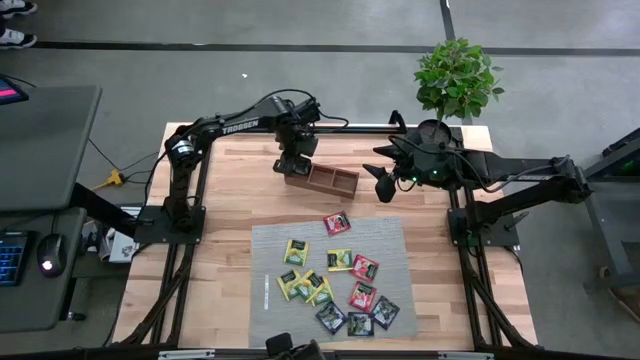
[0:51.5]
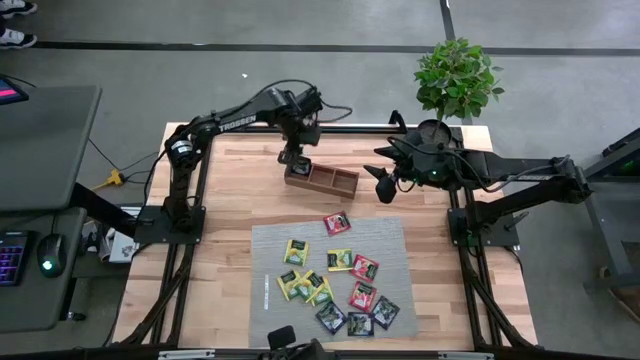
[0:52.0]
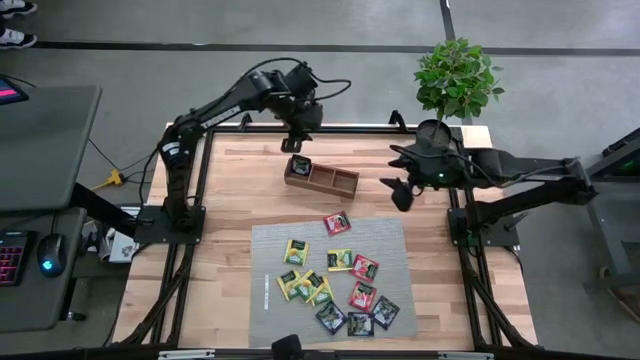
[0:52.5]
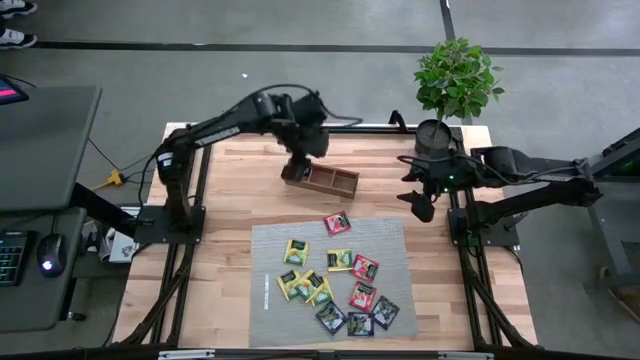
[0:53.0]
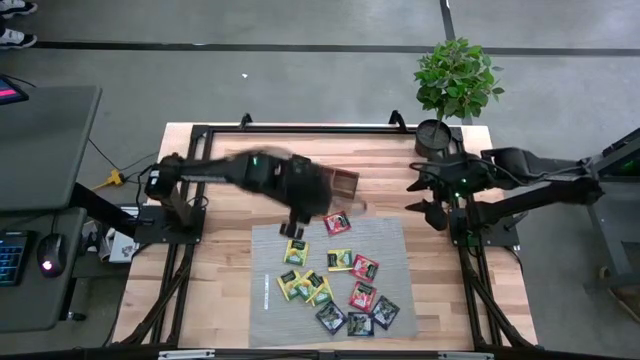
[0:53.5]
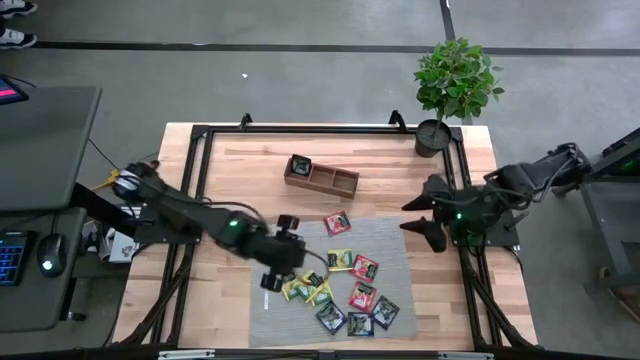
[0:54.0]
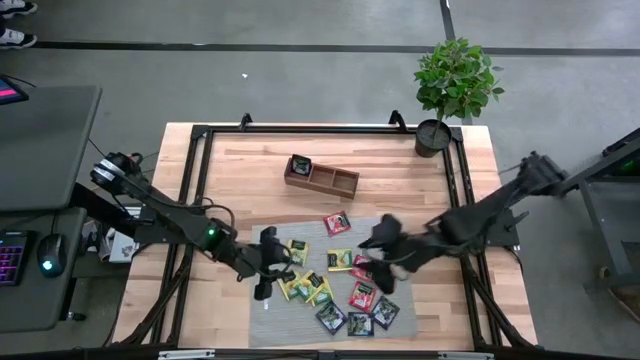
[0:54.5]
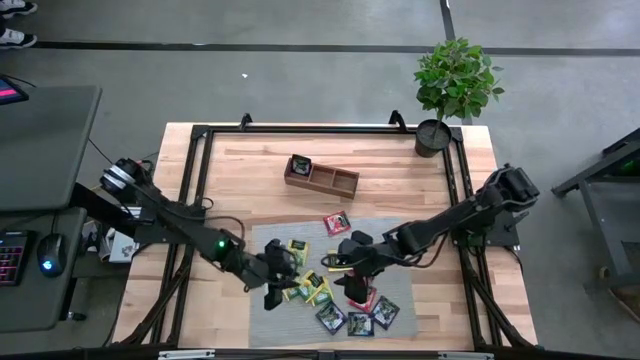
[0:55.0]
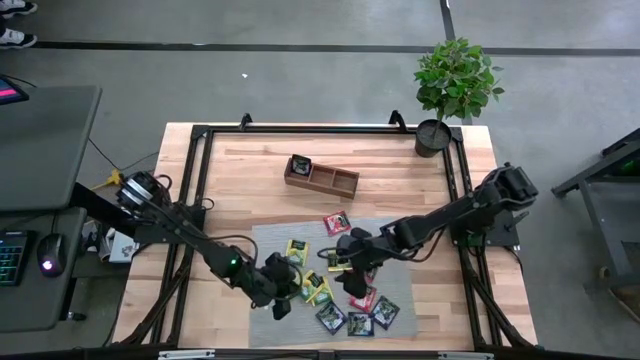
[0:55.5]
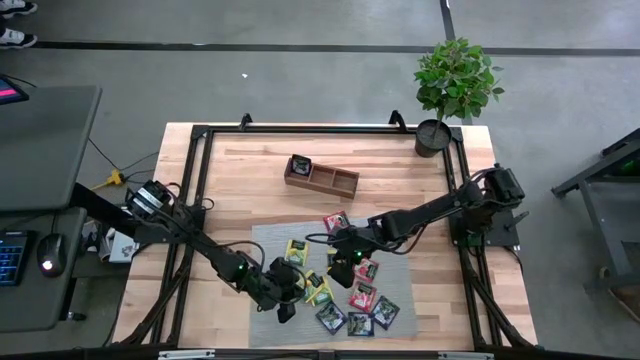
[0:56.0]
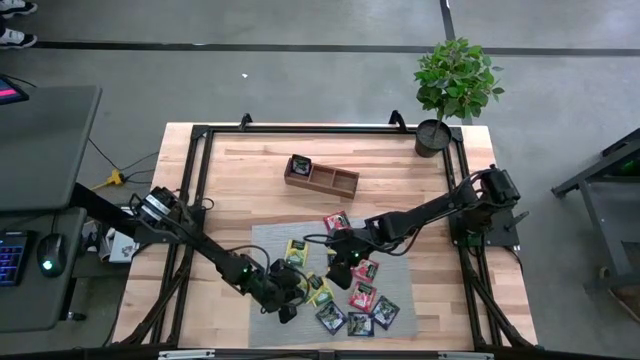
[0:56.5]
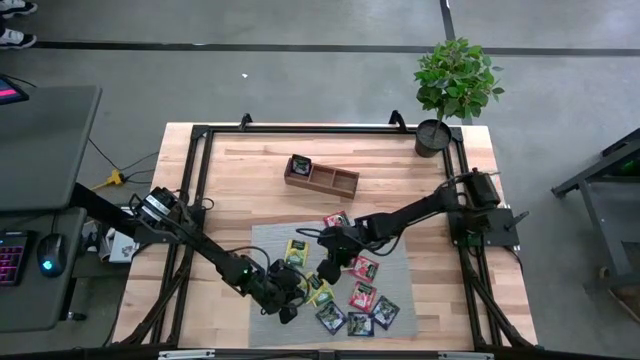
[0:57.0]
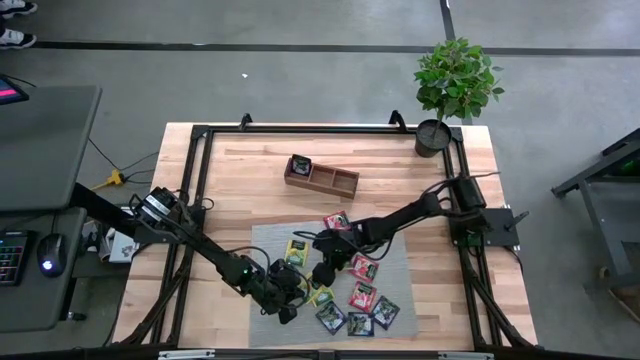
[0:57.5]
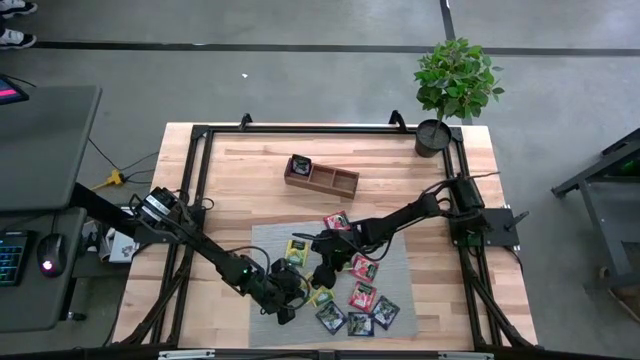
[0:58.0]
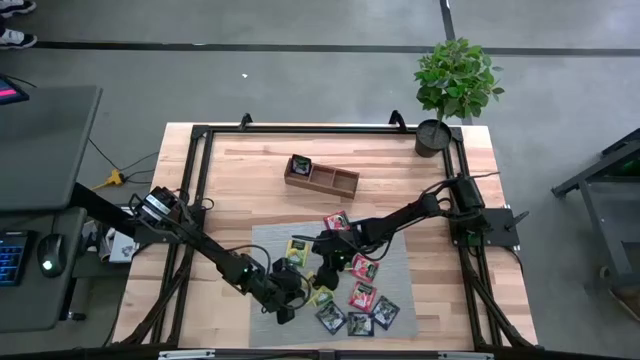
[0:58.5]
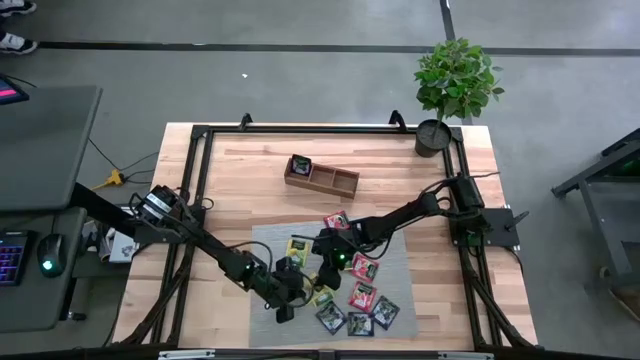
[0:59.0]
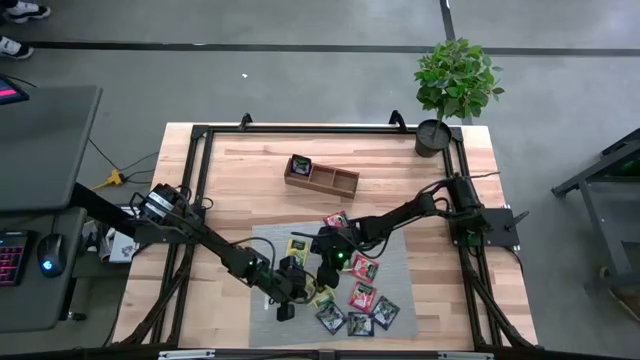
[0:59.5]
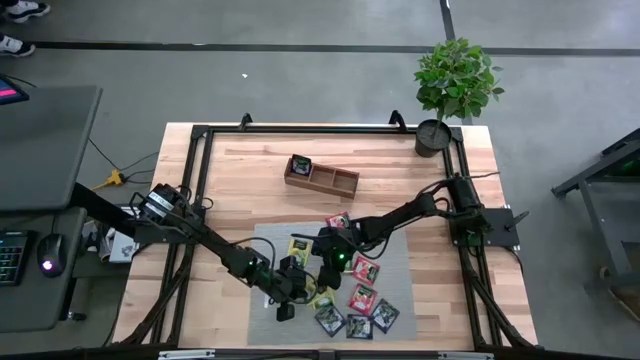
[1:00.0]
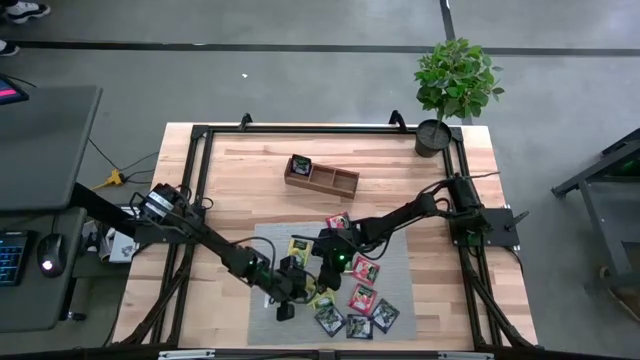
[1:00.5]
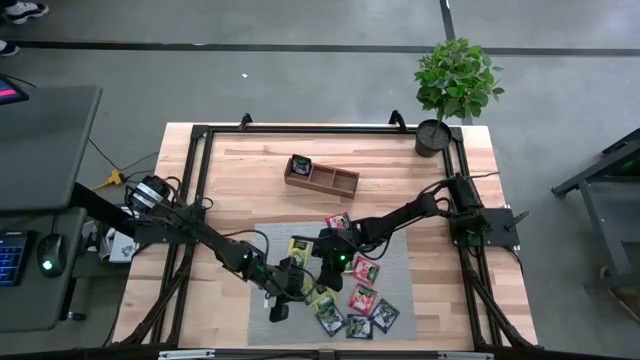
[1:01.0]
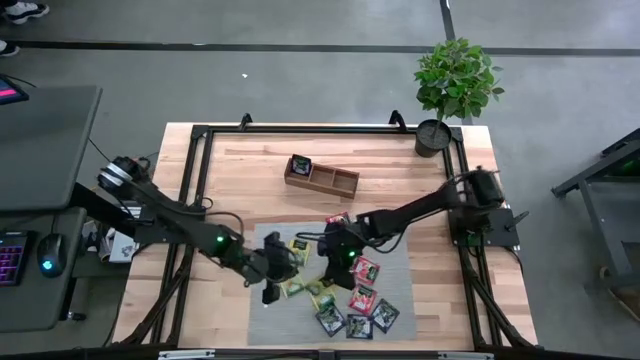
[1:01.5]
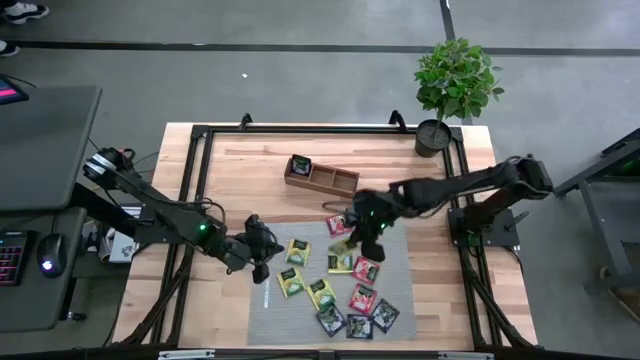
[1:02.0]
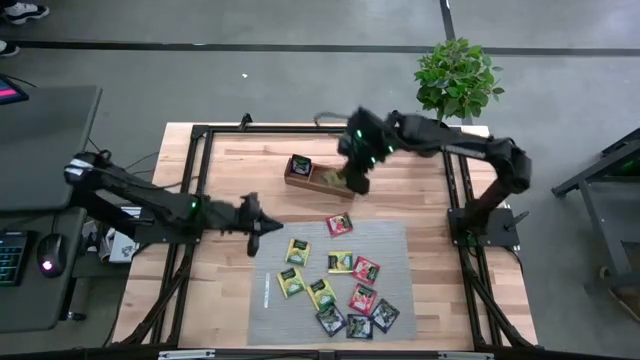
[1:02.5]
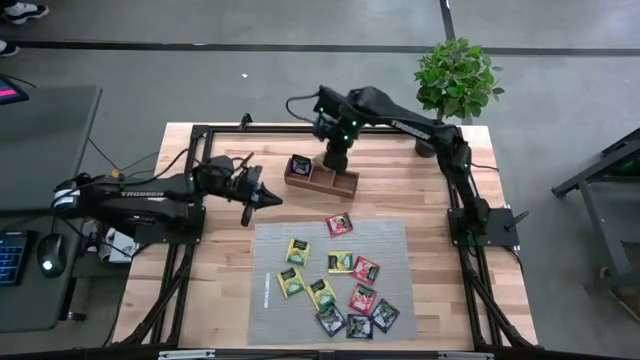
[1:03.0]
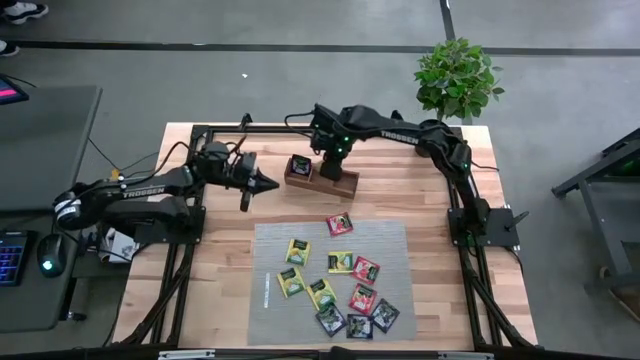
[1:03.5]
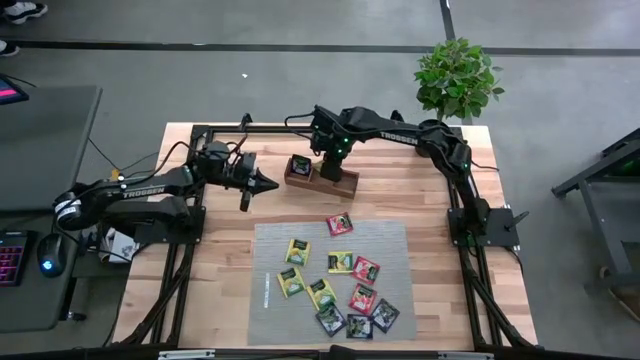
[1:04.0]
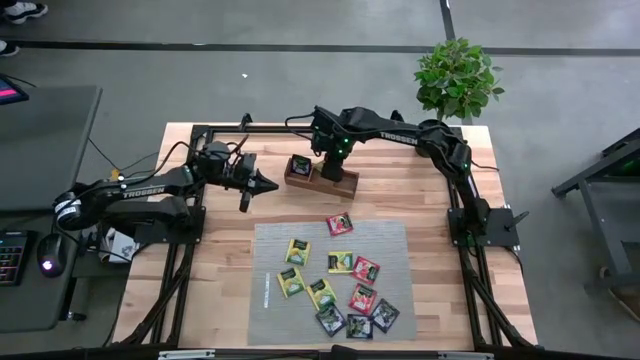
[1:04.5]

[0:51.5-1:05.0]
Task: Pick & Place Tea
Put the yellow tea bag into the middle section of the wooden organizer

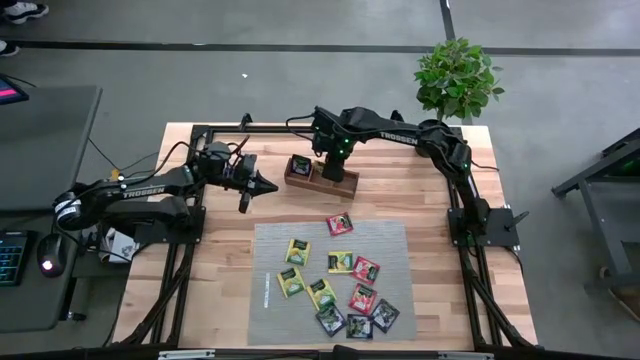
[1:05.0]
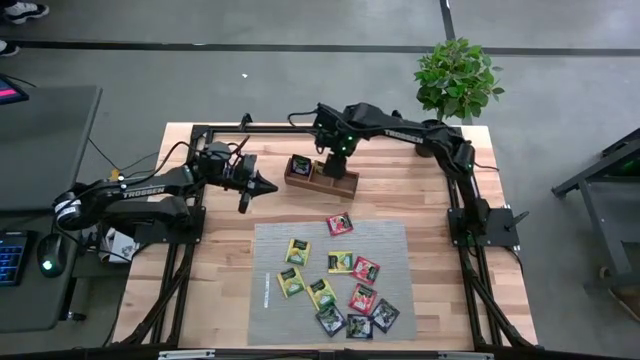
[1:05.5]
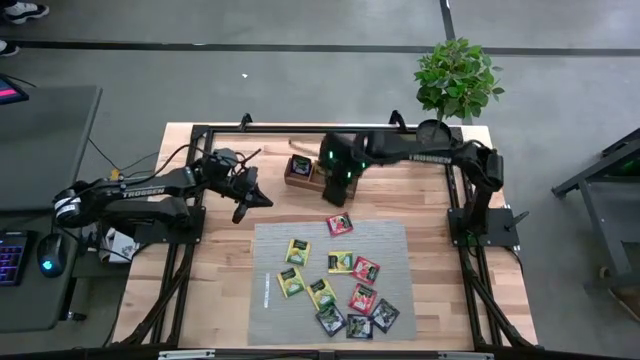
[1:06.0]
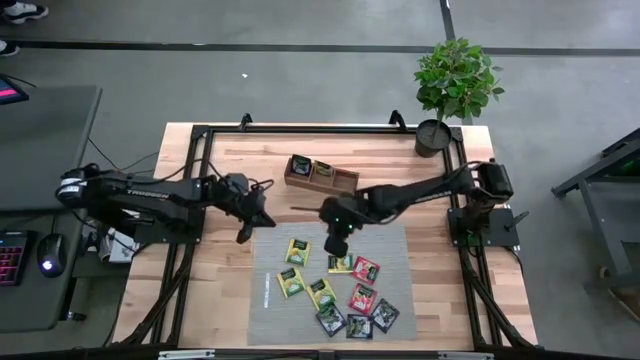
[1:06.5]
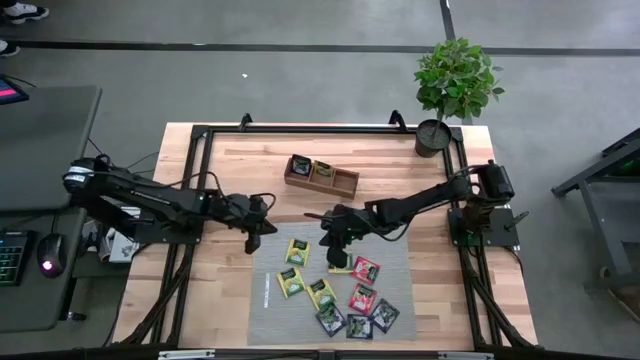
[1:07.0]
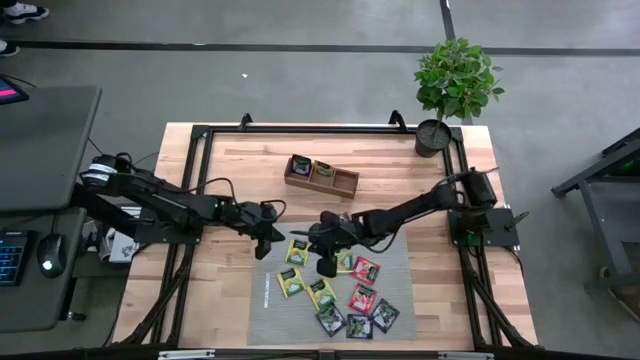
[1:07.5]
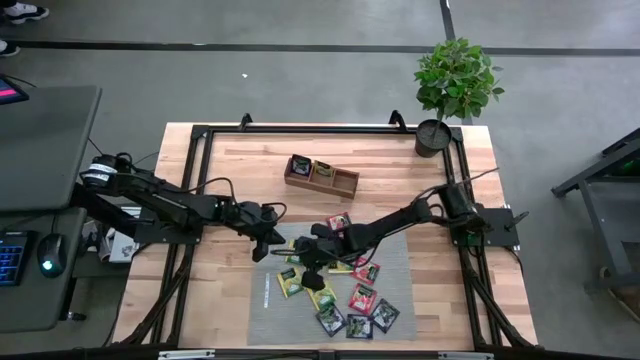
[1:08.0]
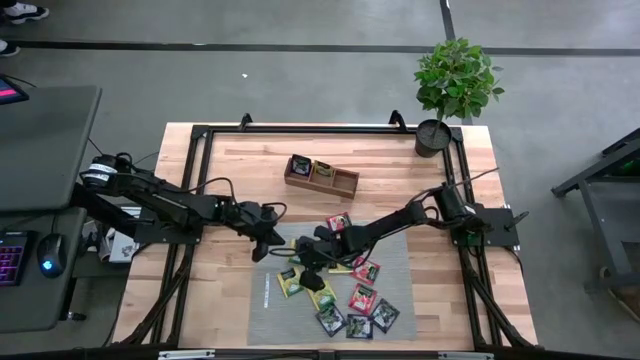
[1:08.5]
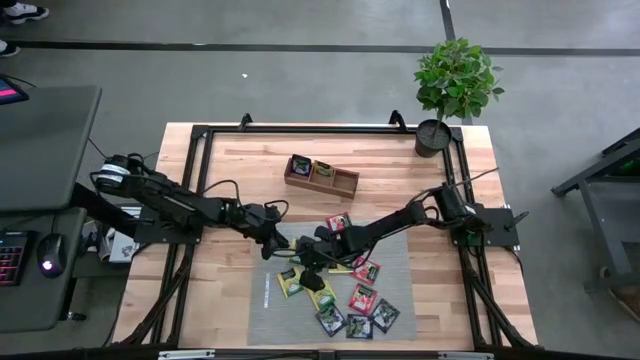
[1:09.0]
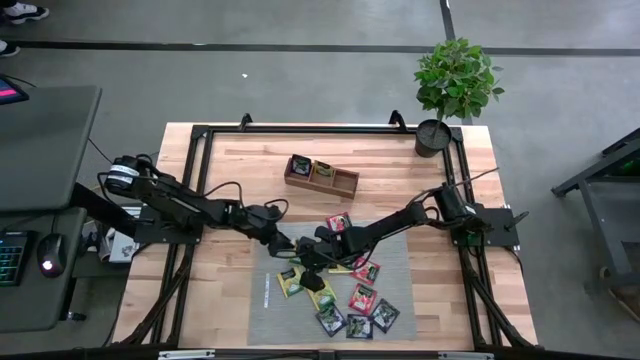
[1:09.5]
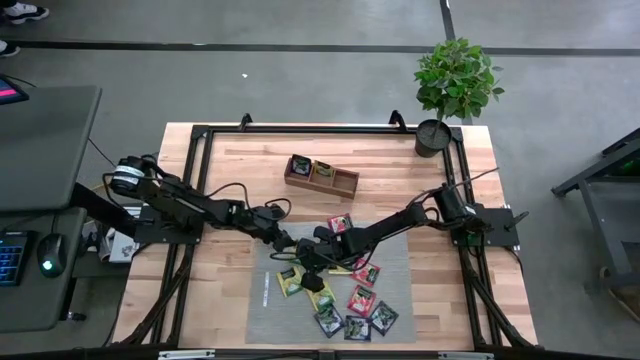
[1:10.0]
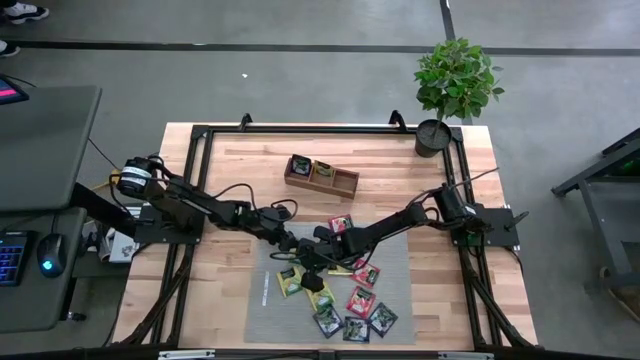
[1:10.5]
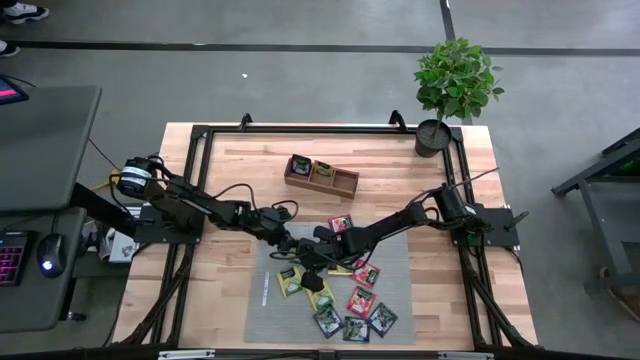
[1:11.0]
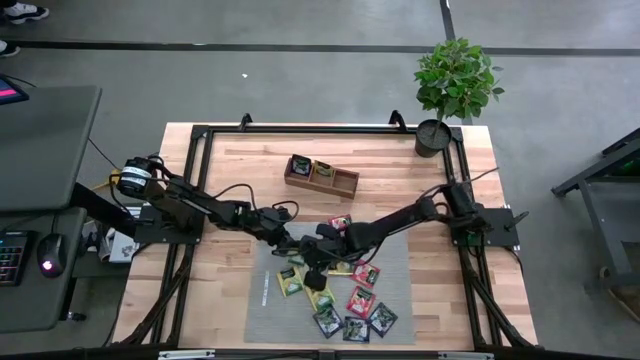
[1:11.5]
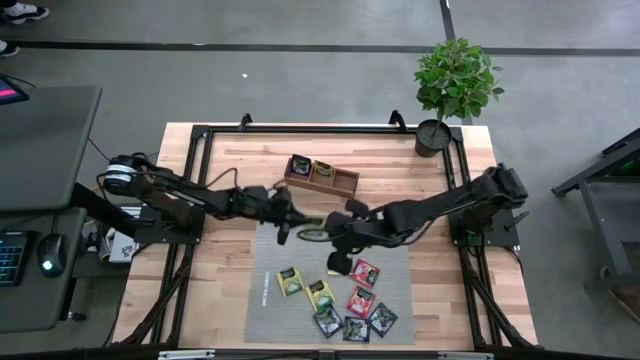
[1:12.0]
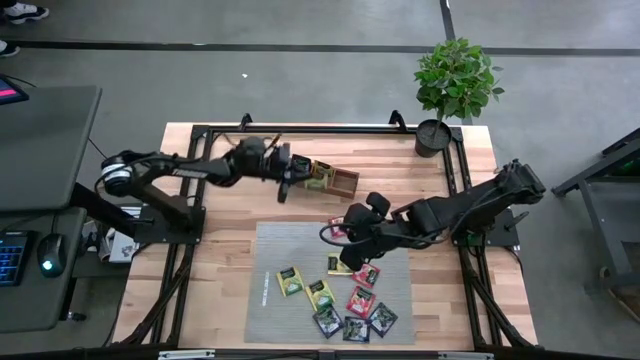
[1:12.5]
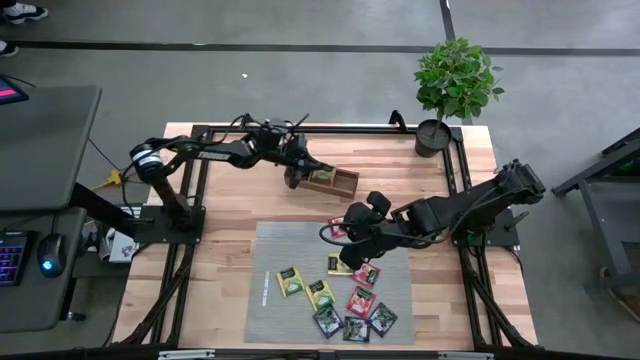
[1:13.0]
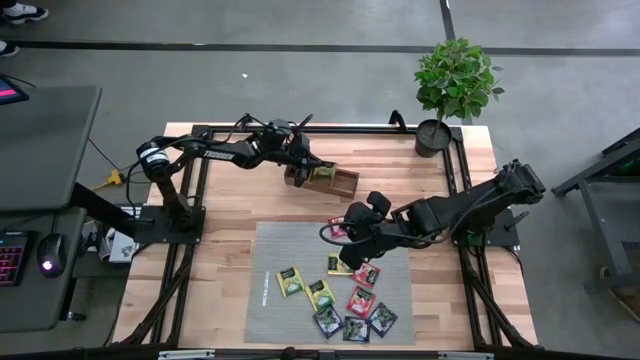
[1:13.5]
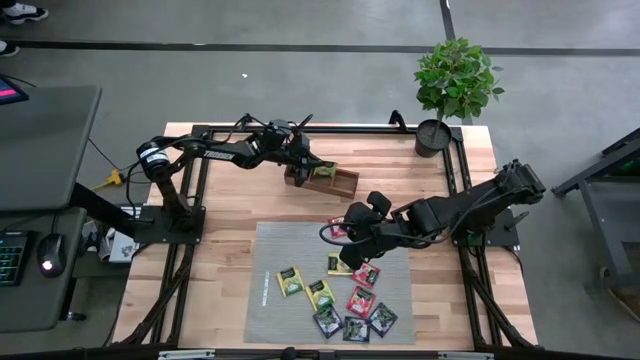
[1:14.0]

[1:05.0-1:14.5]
Put the yellow tea bag into the middle section of the wooden organizer
